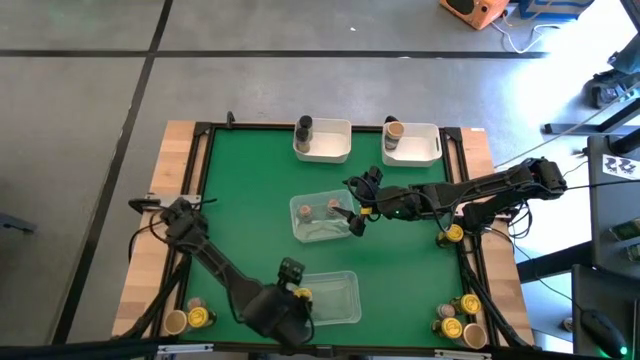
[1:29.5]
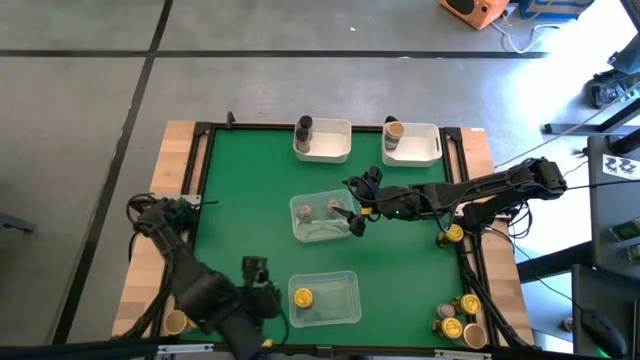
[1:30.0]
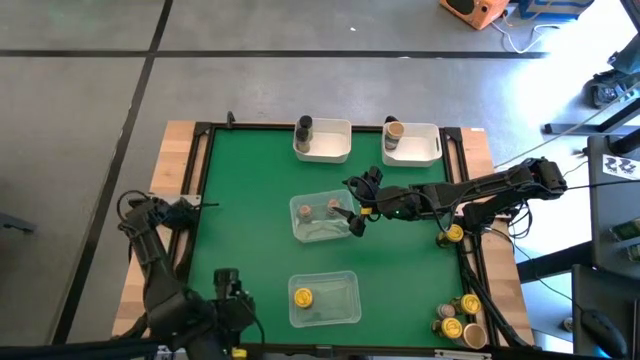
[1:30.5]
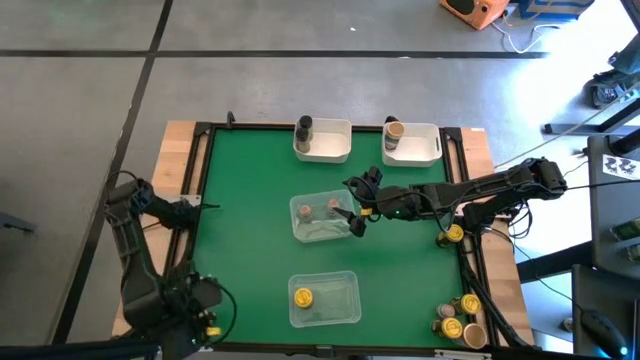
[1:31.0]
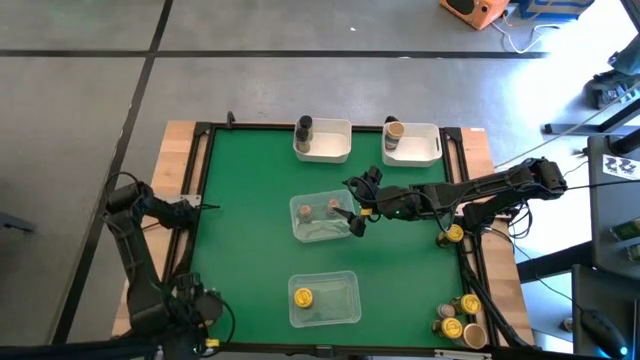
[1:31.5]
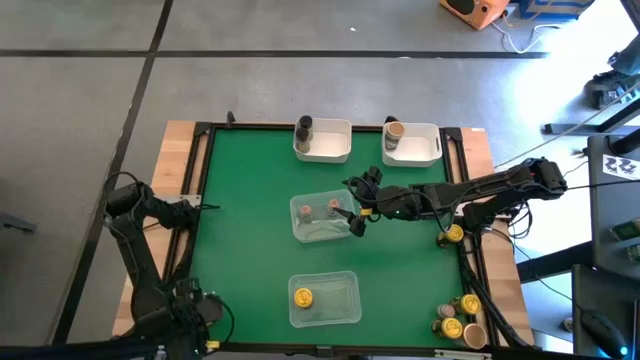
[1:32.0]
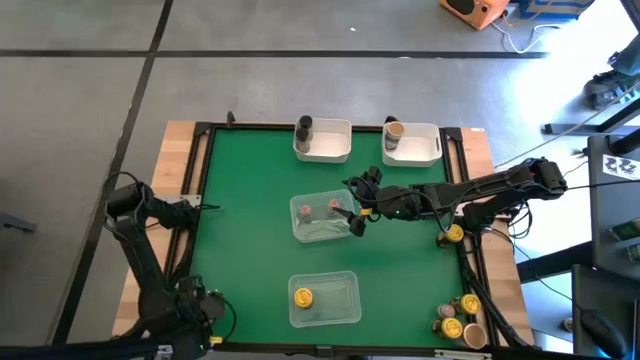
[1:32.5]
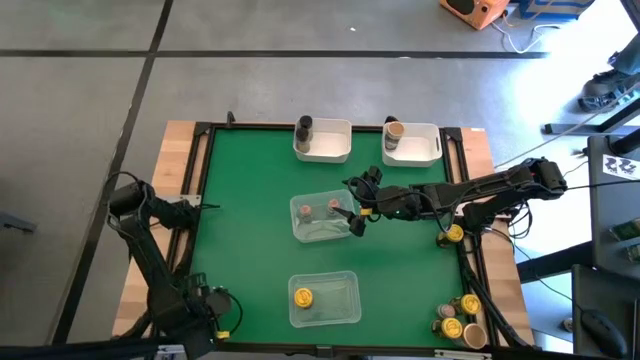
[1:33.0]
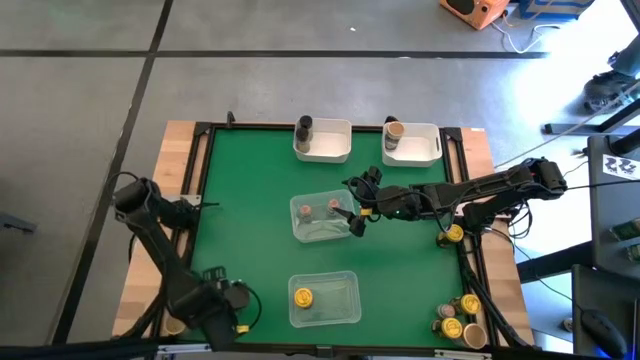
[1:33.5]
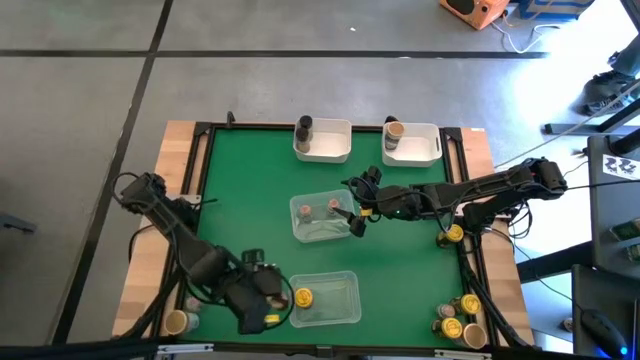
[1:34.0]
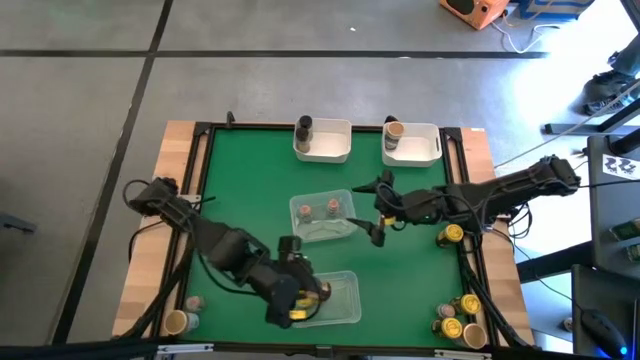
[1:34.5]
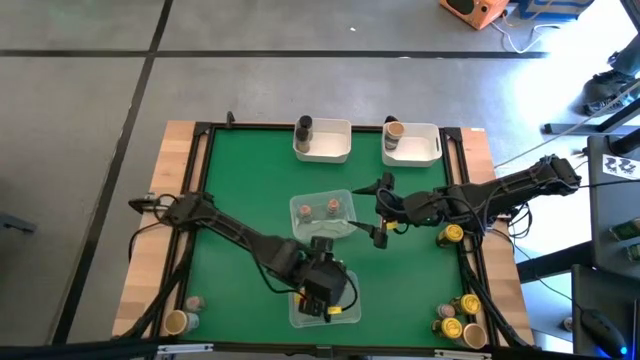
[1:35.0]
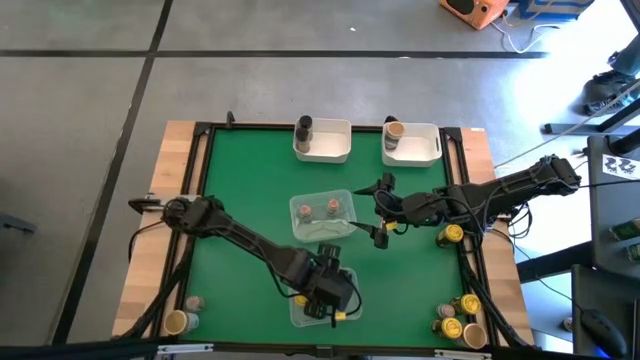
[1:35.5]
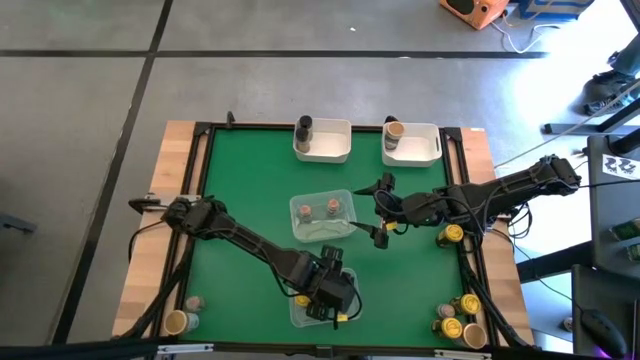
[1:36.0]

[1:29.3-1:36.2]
Task: Sort spices by type
Put the bottom left yellow seasoning bottle into the bottom transparent bin

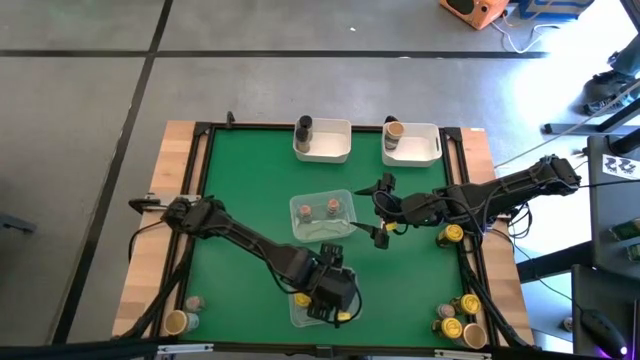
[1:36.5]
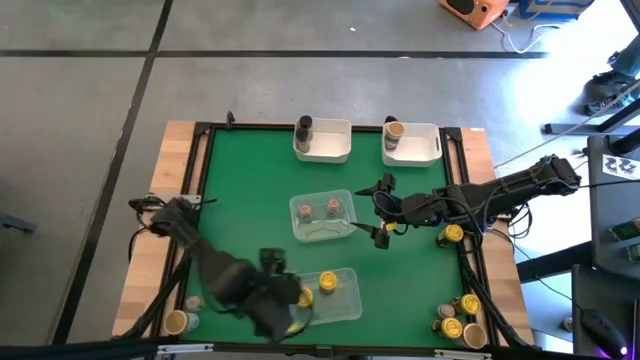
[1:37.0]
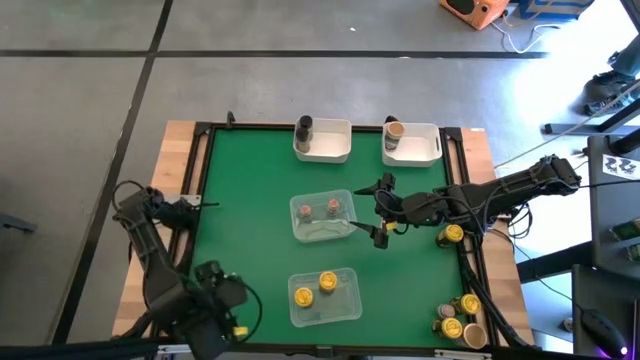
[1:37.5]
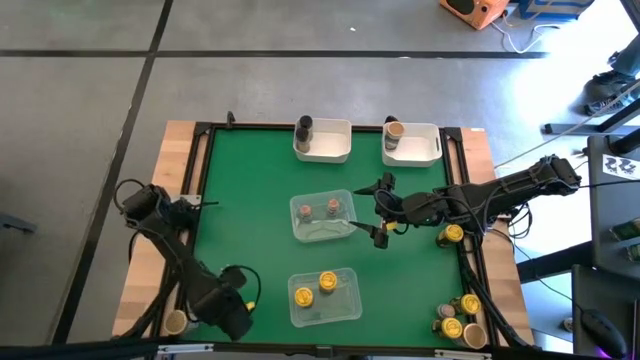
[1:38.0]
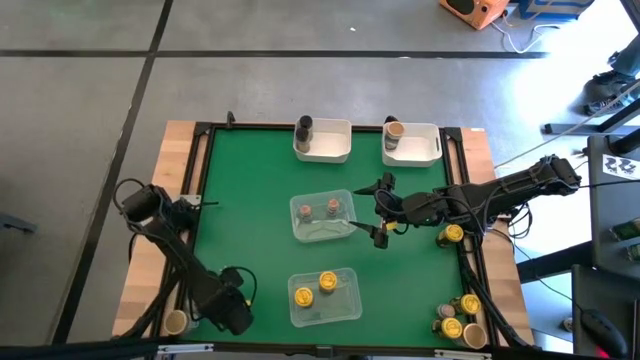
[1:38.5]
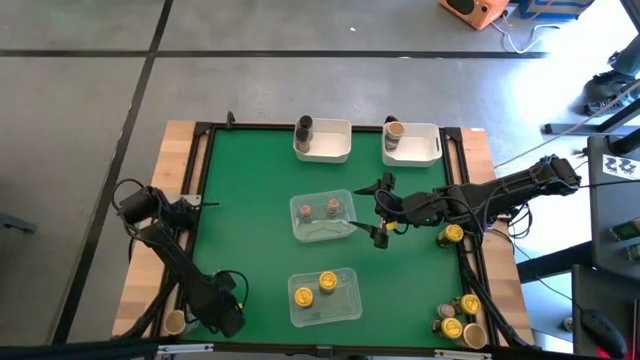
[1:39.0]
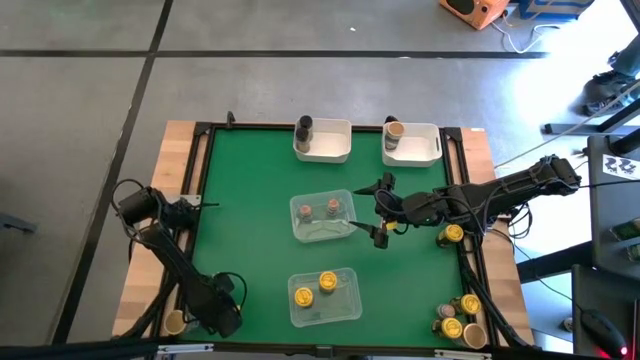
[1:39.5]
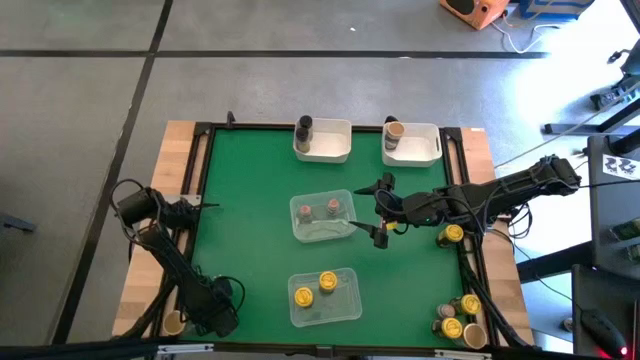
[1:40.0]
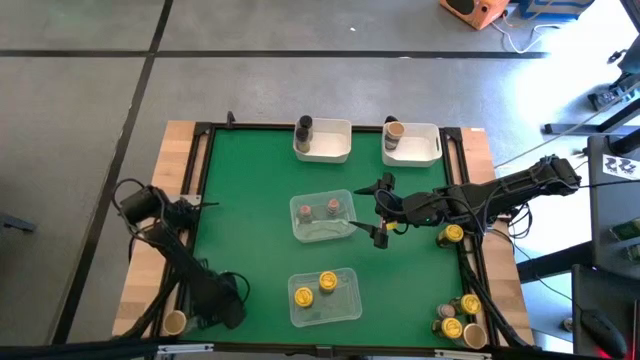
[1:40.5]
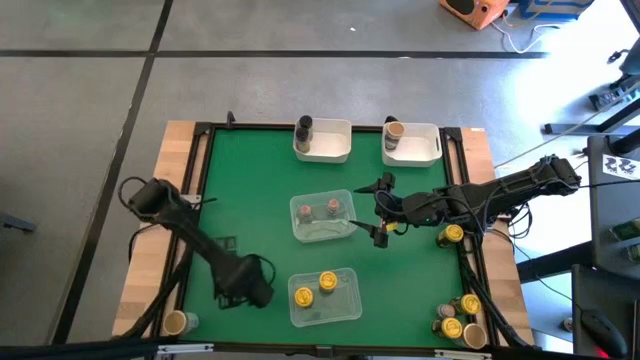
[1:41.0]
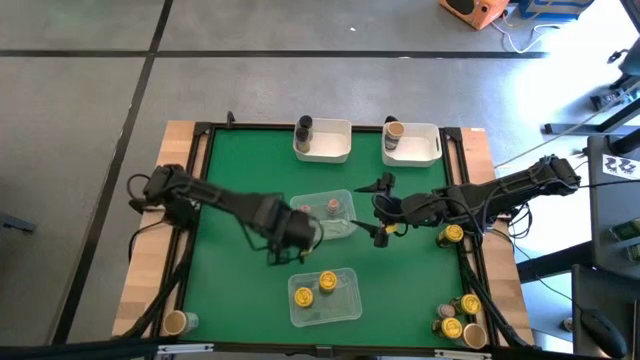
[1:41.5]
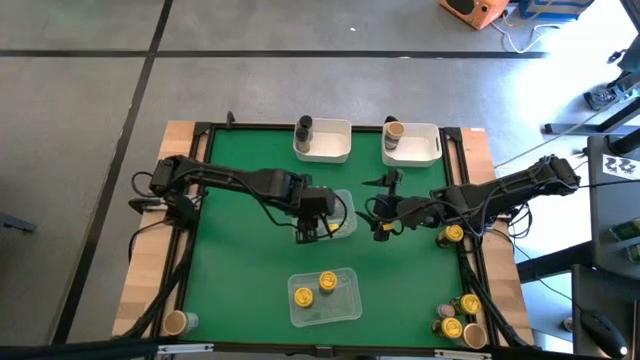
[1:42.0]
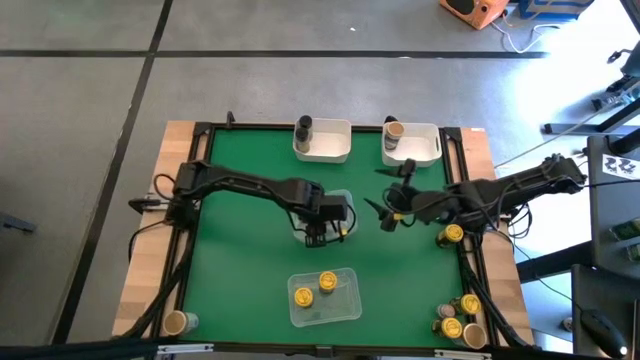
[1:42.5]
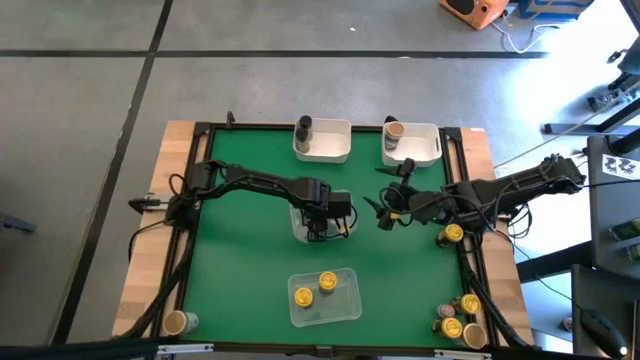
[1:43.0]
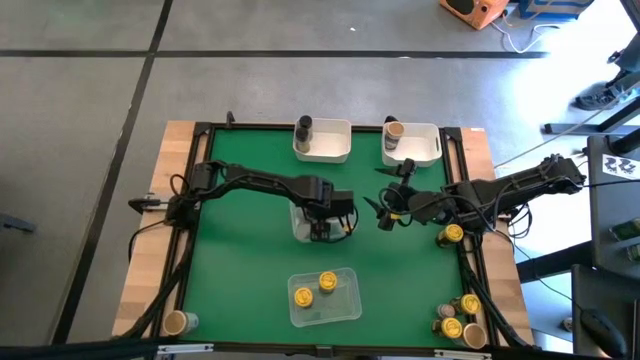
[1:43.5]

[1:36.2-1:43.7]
Put the bottom left transparent seasoning bottle into the center transparent bin

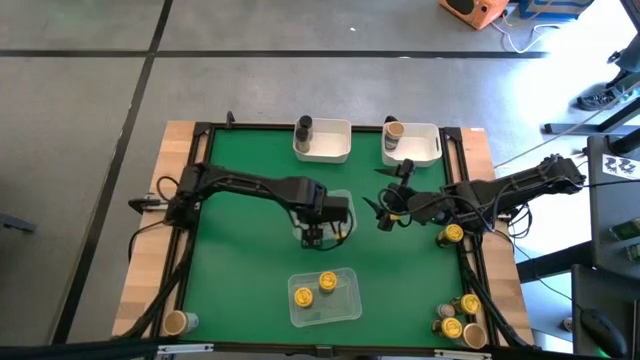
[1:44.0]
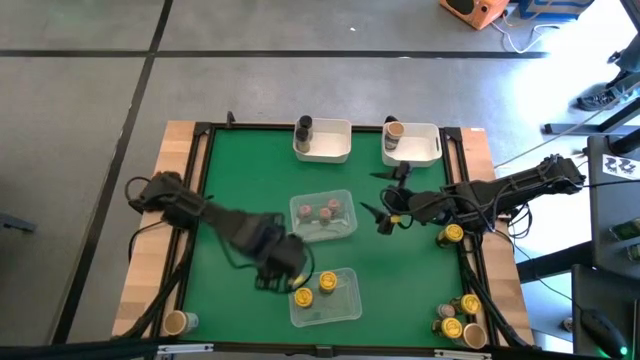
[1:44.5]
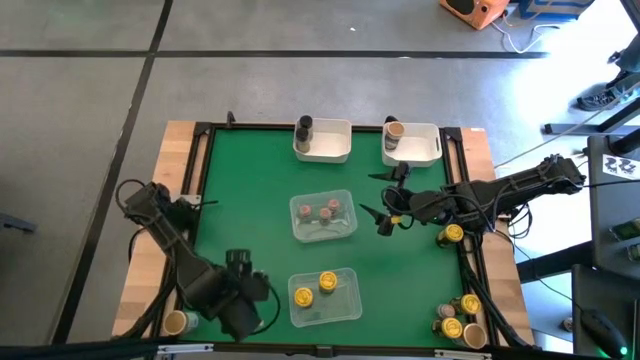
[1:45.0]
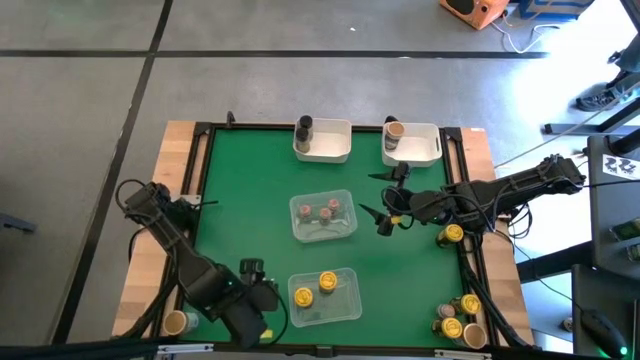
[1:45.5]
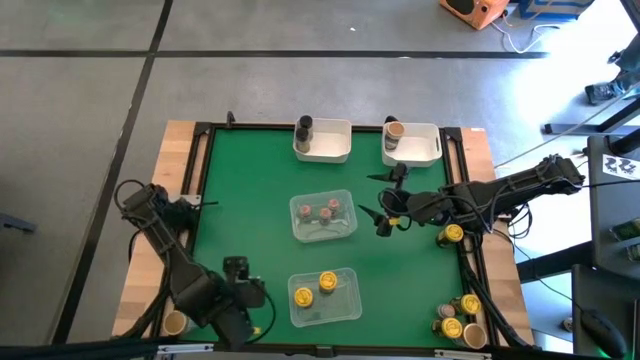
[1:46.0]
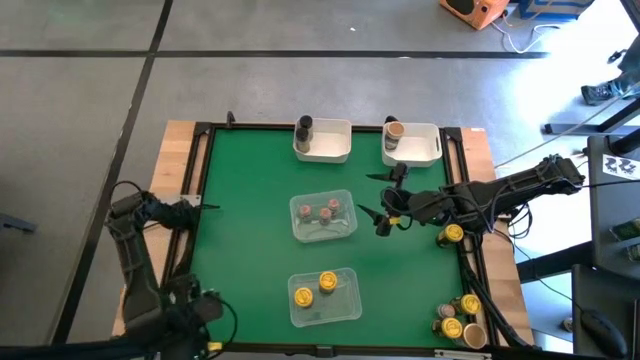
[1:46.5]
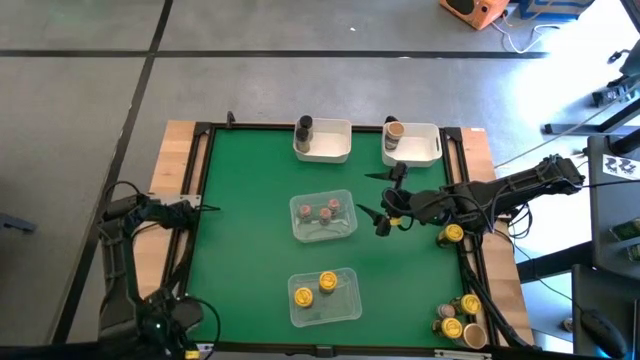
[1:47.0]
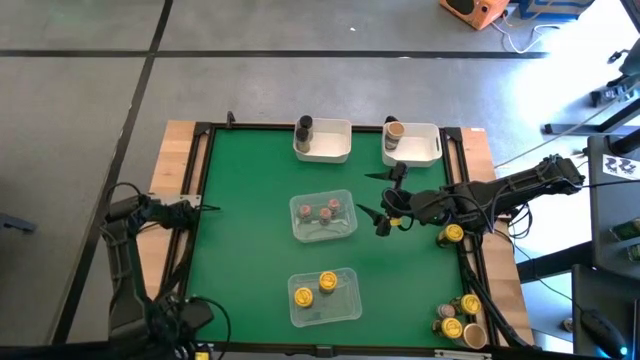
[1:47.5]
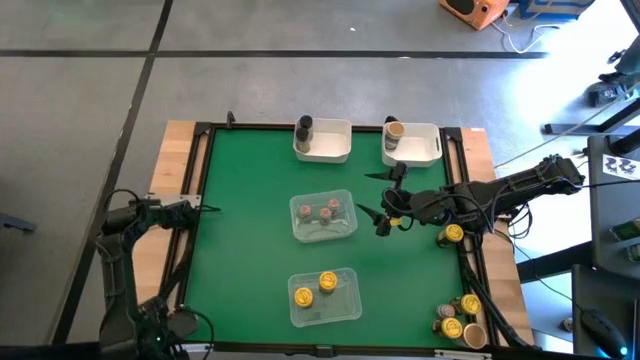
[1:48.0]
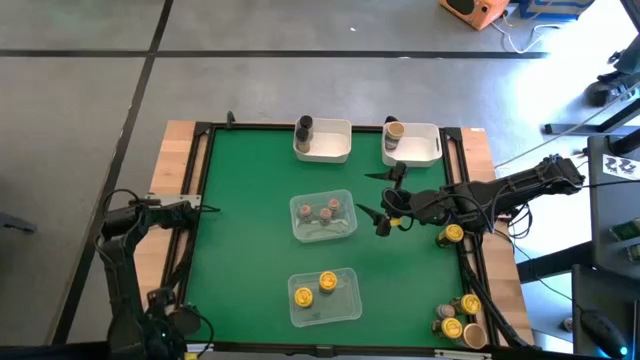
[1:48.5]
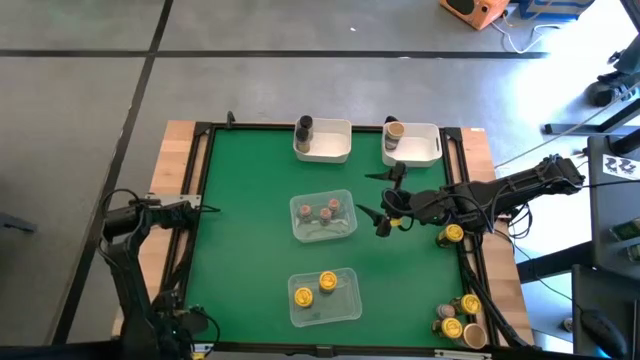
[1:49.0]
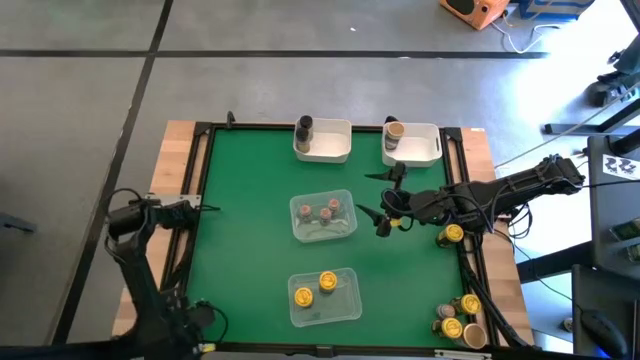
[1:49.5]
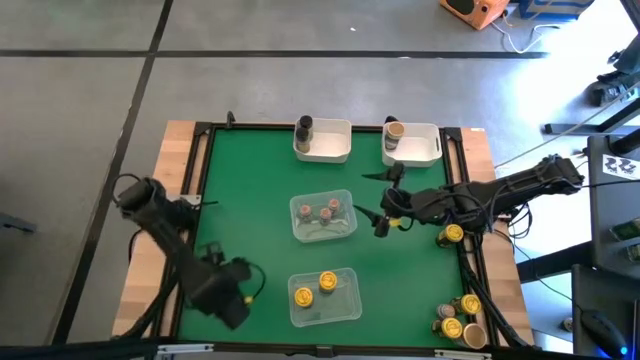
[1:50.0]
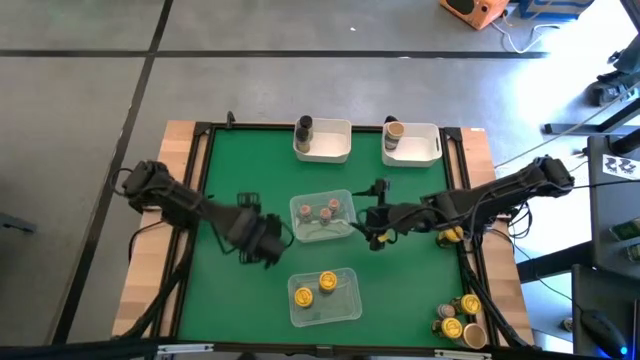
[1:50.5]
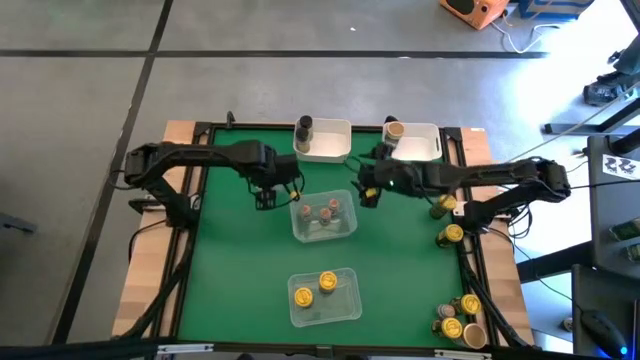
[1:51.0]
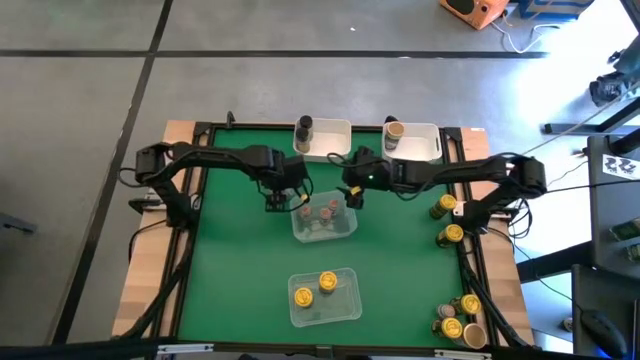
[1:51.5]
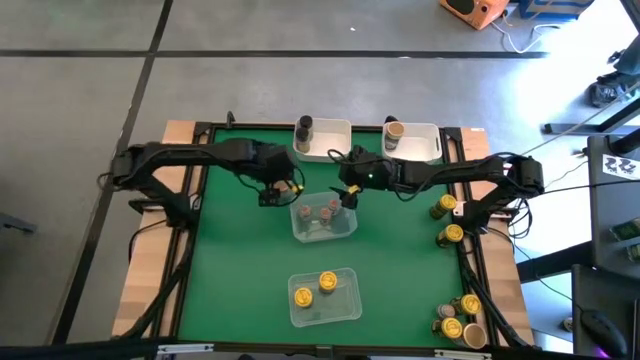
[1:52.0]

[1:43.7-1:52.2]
Move the bottom left brown seasoning bottle to the center of the table
